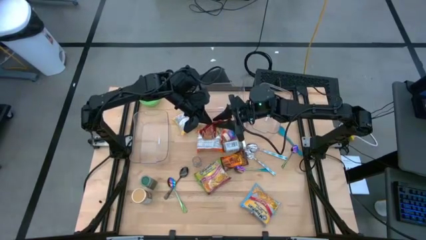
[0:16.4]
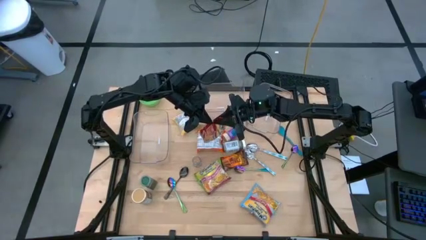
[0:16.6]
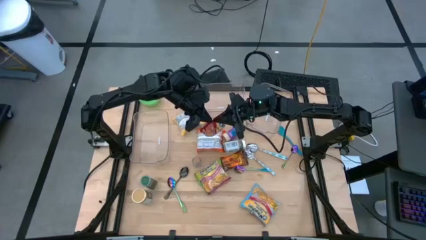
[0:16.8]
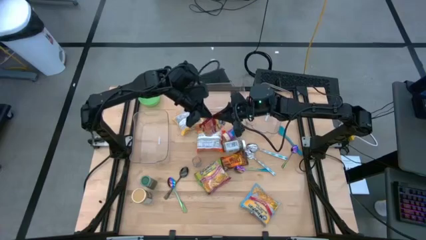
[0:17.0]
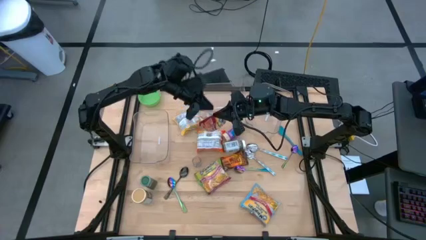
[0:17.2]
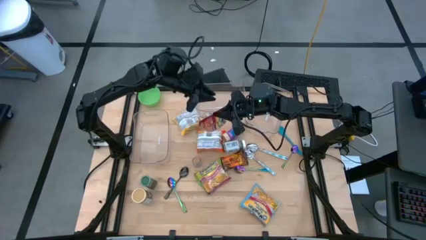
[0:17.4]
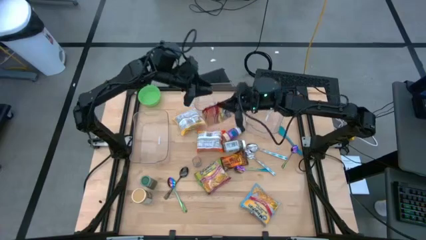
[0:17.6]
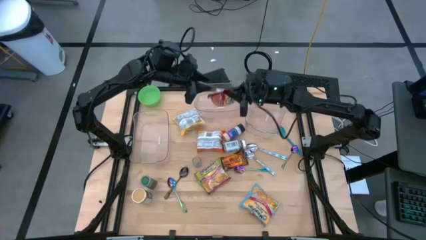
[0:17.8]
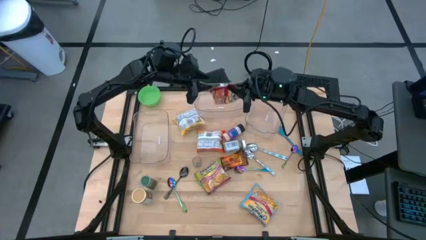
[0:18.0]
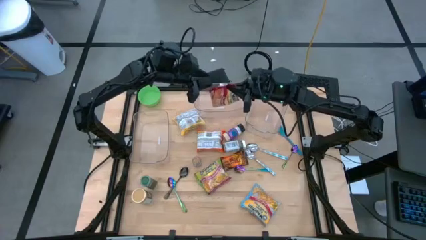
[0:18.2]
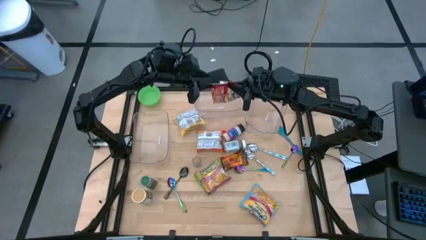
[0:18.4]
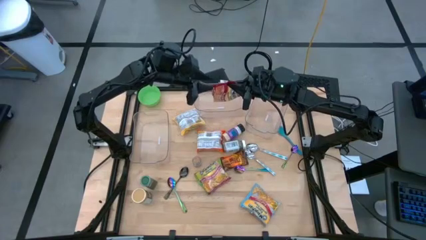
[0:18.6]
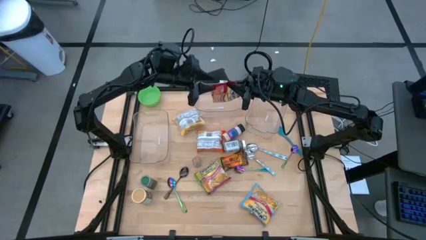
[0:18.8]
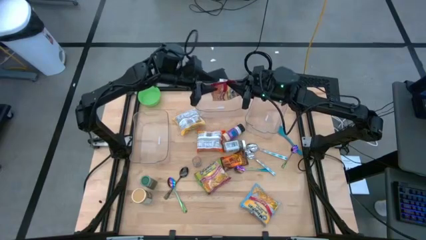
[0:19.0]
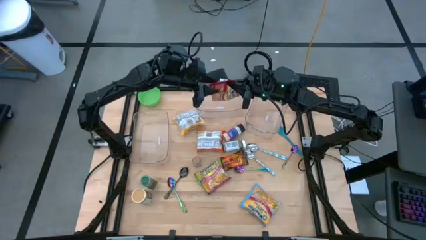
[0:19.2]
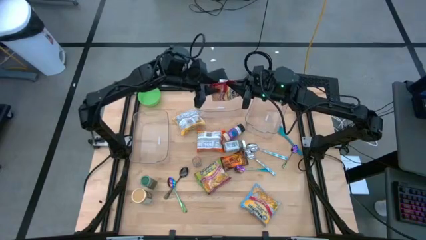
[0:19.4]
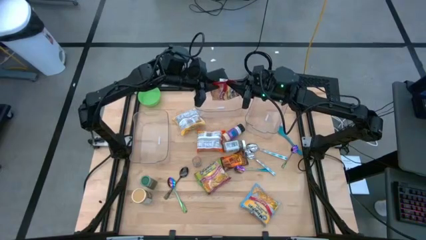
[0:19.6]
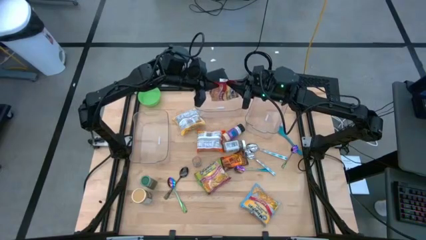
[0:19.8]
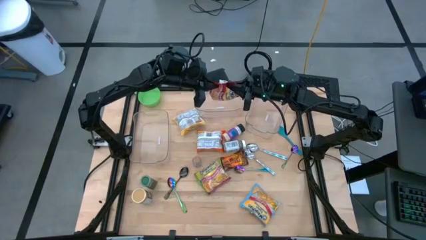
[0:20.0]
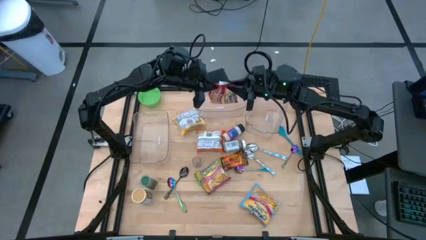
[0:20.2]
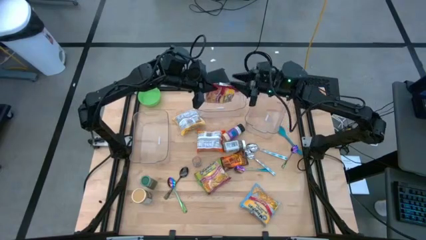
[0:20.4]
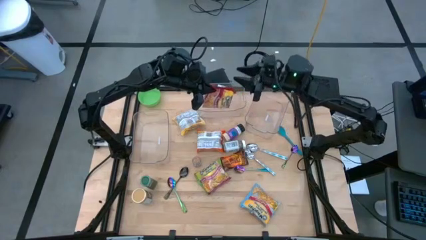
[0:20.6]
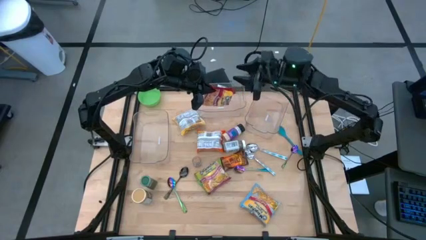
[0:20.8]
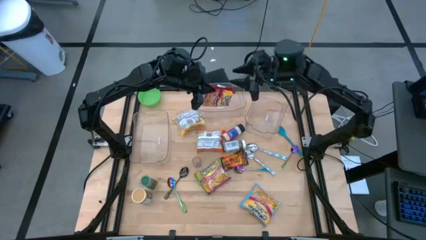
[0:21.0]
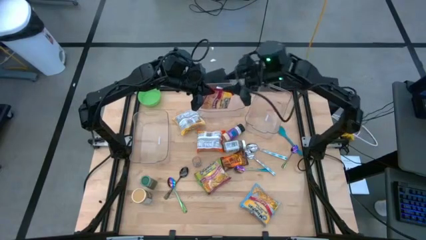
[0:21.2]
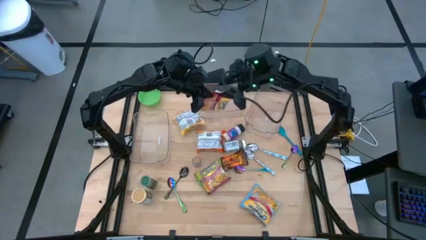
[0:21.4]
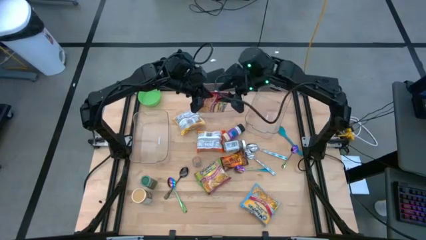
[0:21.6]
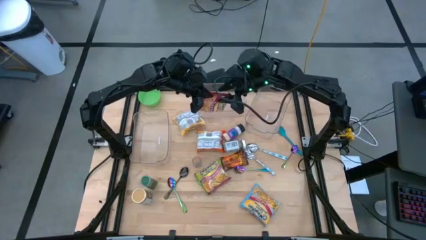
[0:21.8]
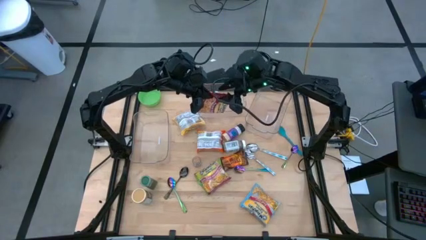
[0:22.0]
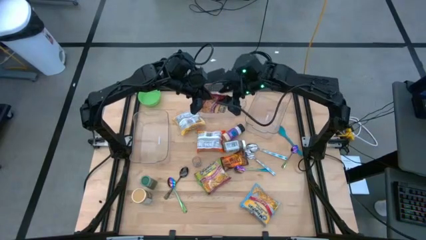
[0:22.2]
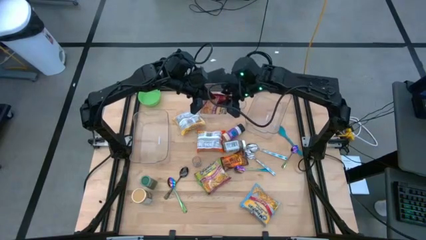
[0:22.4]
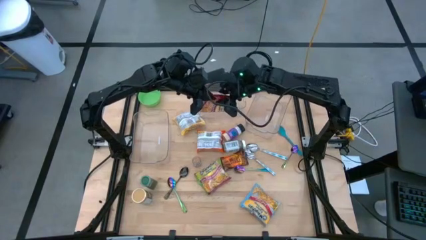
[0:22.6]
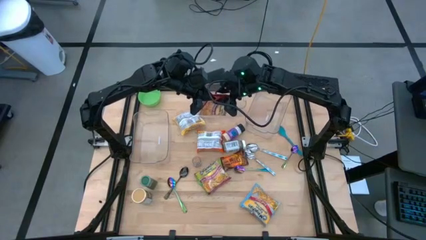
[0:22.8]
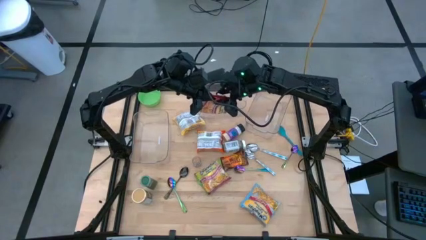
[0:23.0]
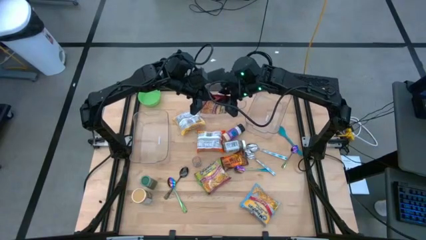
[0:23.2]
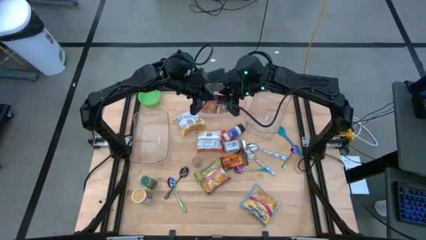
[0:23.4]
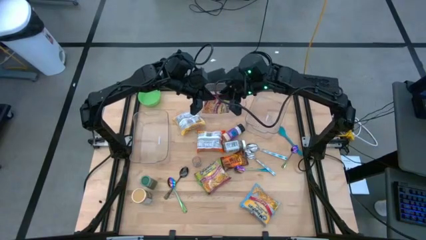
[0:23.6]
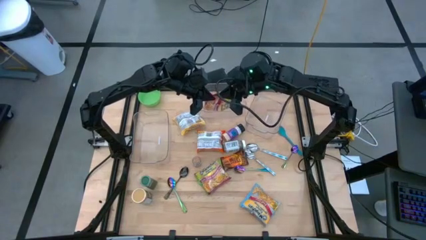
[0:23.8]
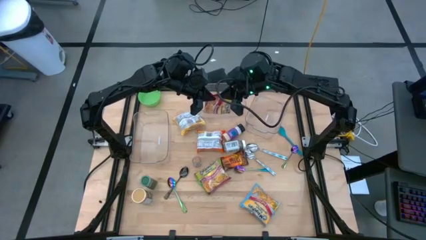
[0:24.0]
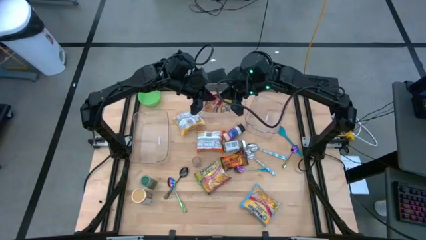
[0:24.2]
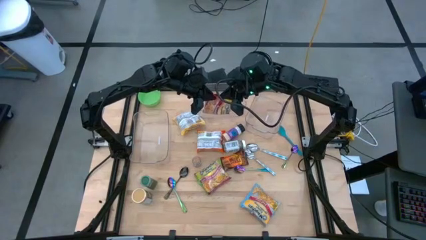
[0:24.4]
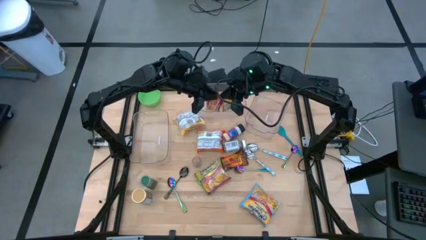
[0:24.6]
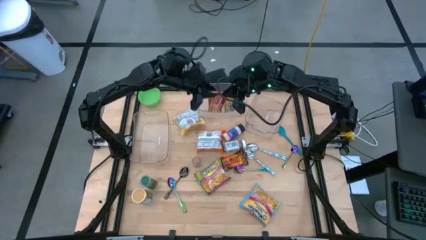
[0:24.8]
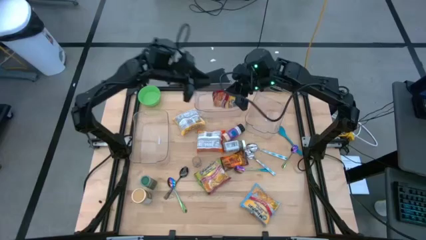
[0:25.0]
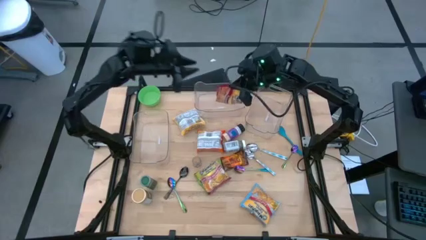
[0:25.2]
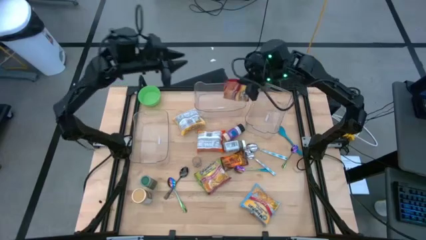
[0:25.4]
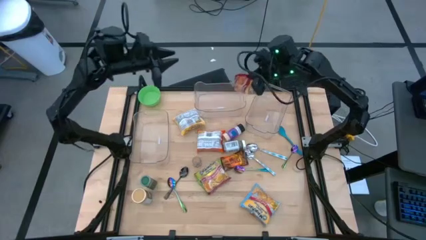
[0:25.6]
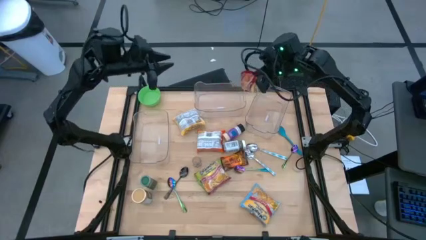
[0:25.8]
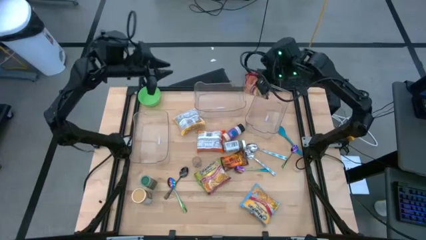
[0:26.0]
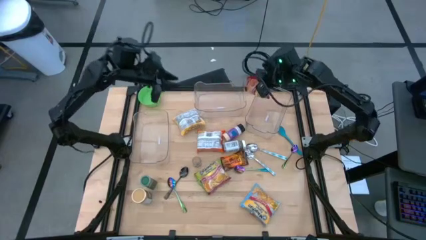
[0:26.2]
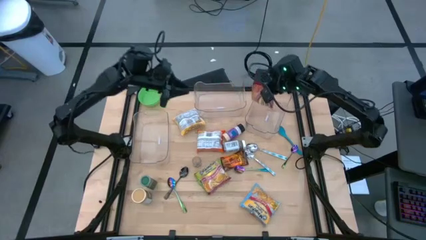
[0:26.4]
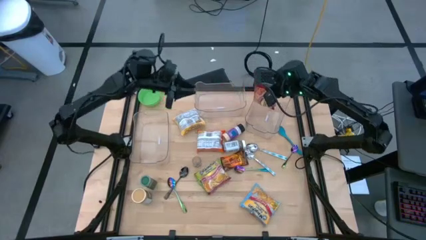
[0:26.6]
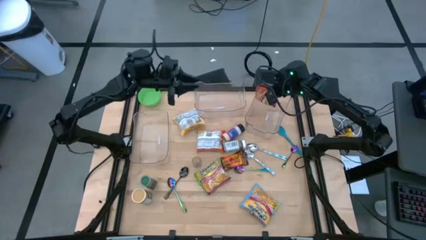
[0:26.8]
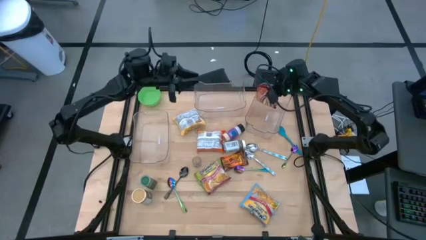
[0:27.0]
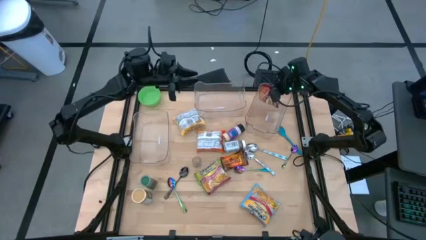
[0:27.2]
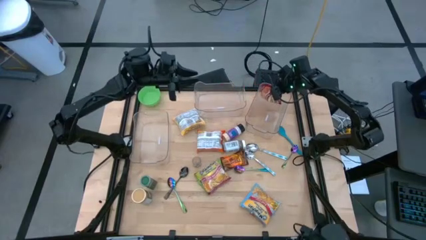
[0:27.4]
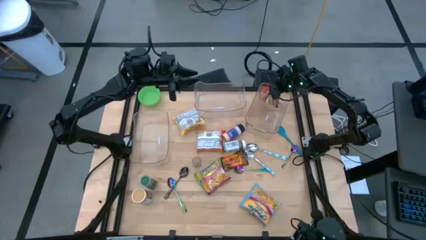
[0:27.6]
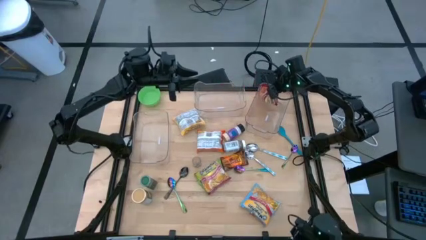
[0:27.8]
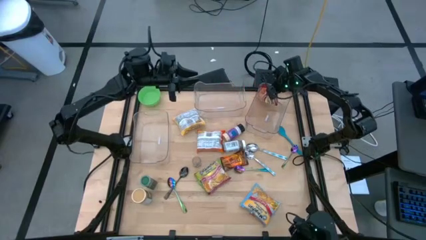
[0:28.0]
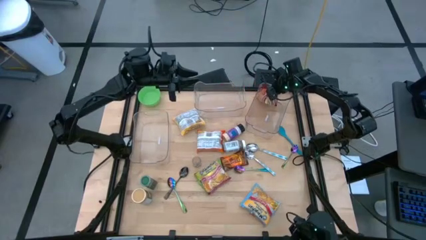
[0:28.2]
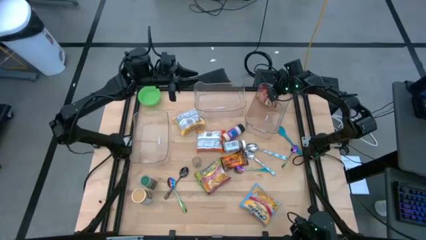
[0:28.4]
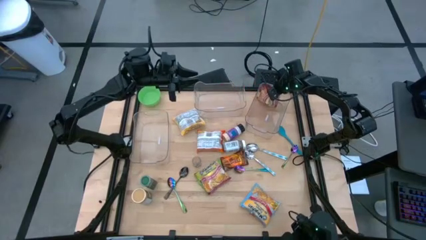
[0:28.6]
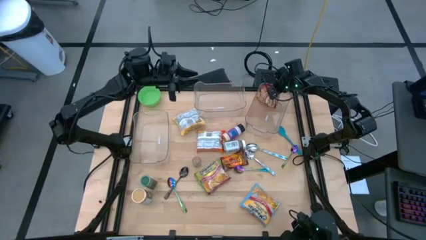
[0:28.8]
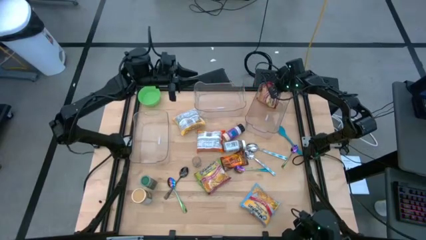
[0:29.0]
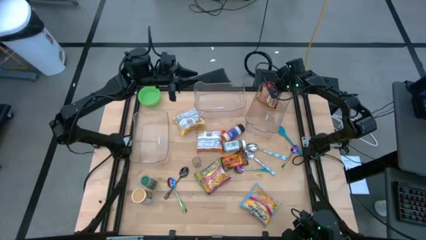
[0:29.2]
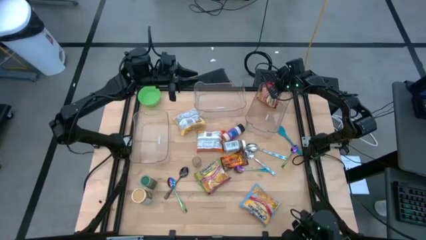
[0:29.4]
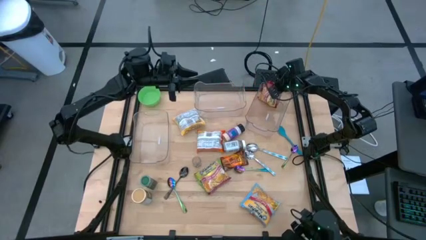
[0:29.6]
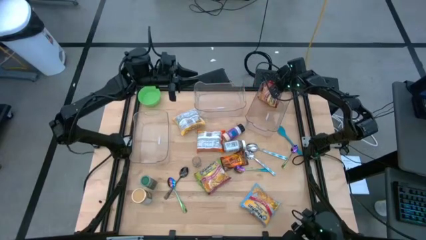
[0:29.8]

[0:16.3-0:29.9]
Task: Pick & Place Food Item
Put the red noodle pack into the right transparent bin

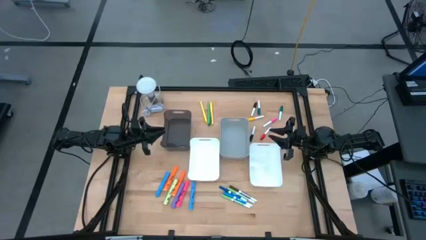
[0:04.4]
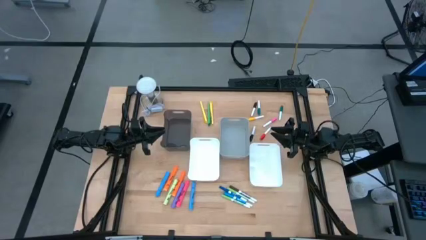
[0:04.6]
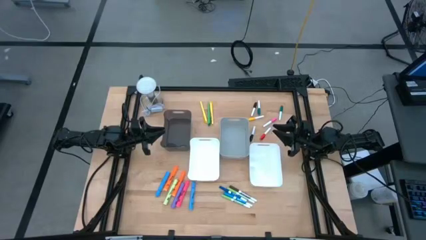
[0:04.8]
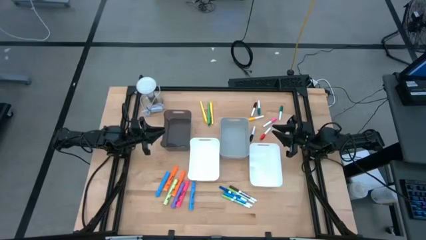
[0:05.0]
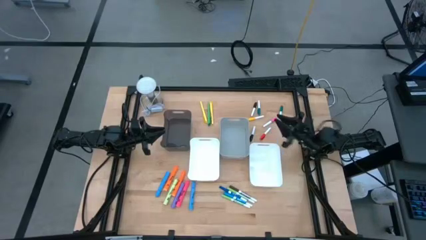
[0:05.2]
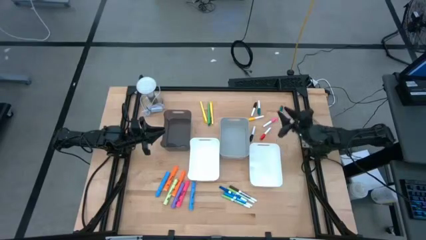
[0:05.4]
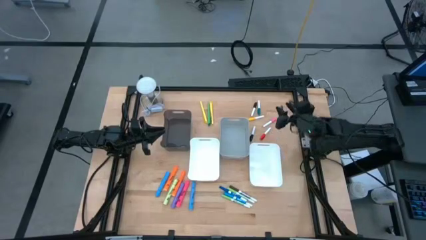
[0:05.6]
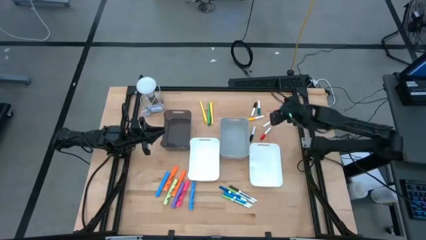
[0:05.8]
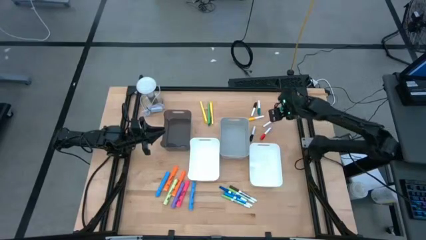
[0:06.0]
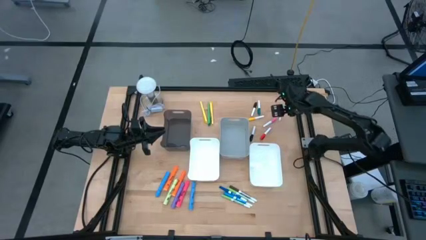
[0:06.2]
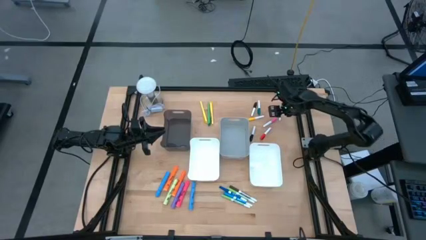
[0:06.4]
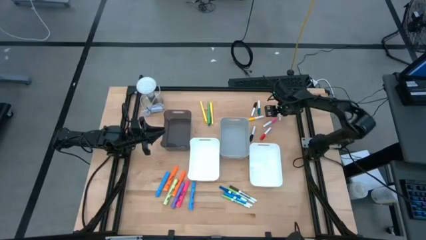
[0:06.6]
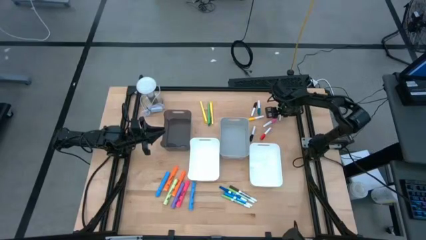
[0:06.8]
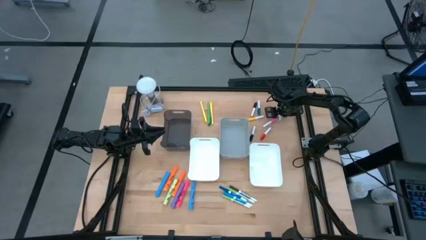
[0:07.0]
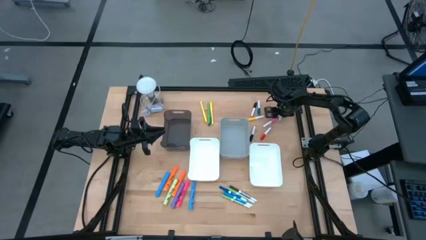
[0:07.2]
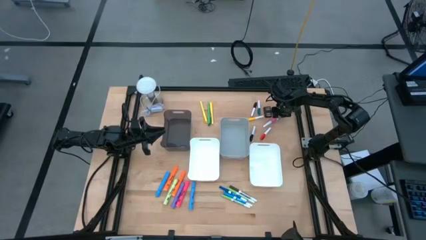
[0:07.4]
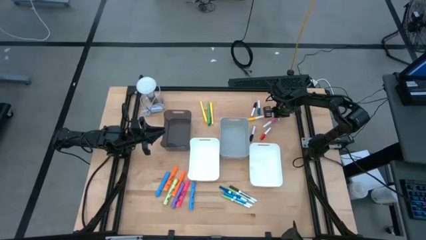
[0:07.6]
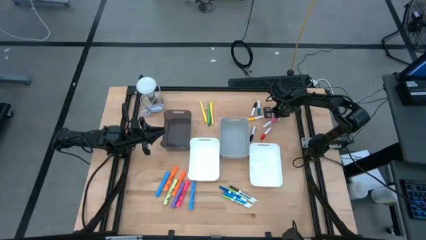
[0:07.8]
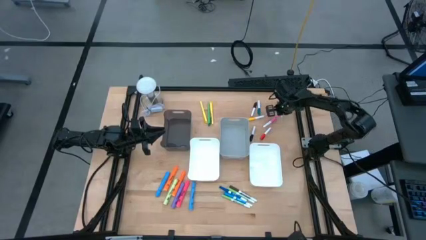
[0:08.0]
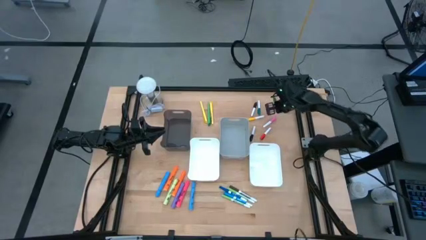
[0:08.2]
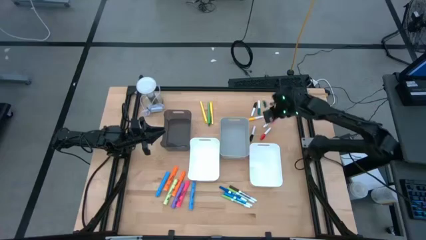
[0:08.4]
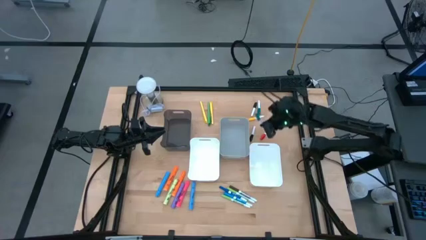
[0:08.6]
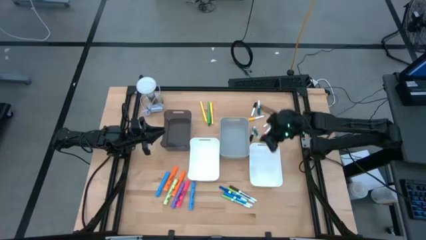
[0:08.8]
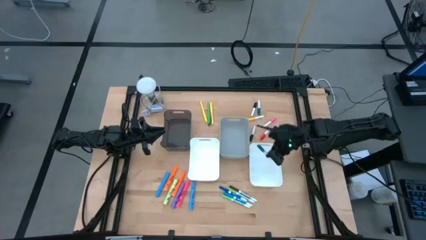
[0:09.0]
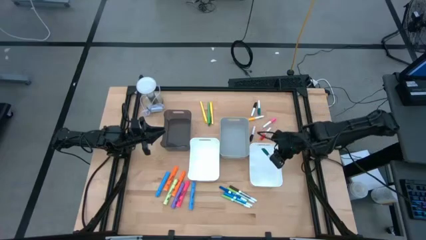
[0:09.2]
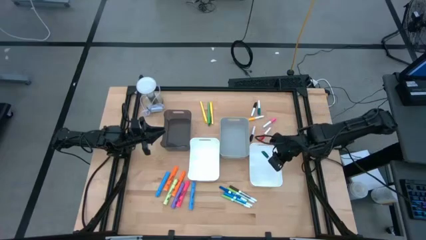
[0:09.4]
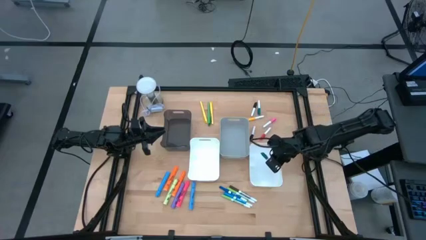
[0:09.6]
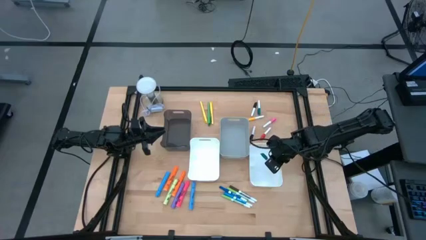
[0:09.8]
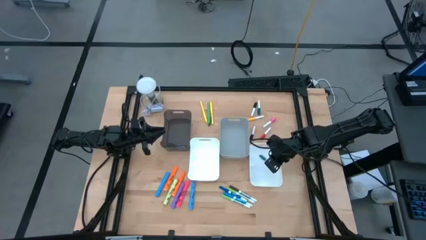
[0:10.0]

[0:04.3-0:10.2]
Task: Pick & Place Markers
Put the right green mini marker into the right white bin
